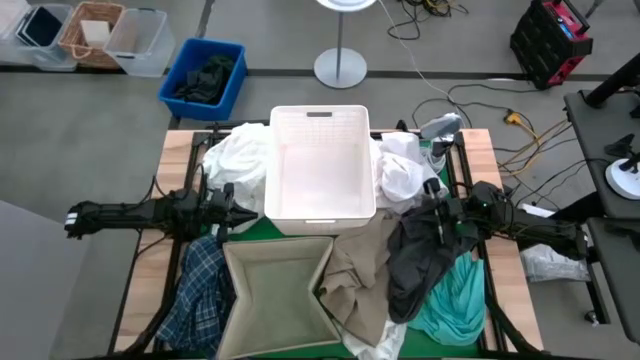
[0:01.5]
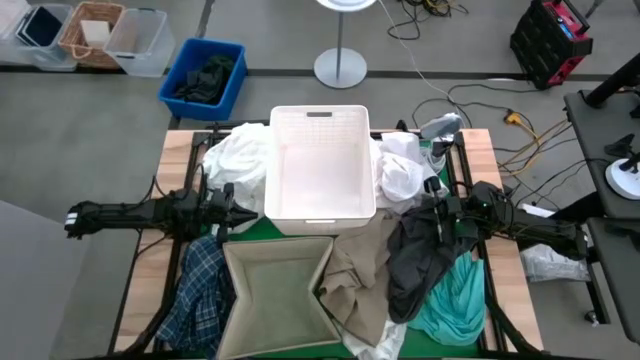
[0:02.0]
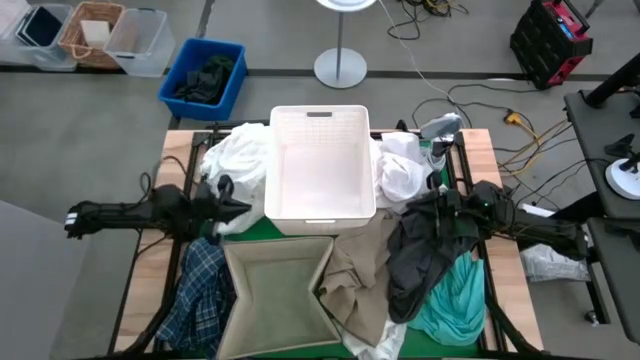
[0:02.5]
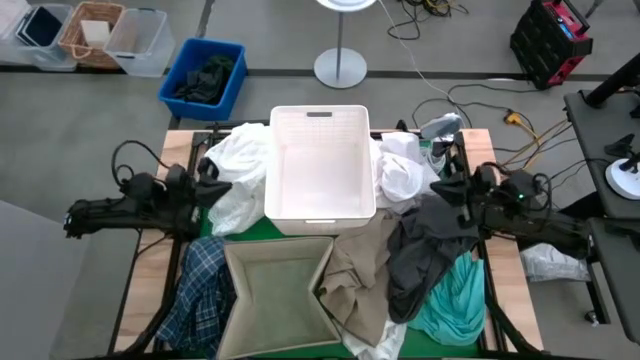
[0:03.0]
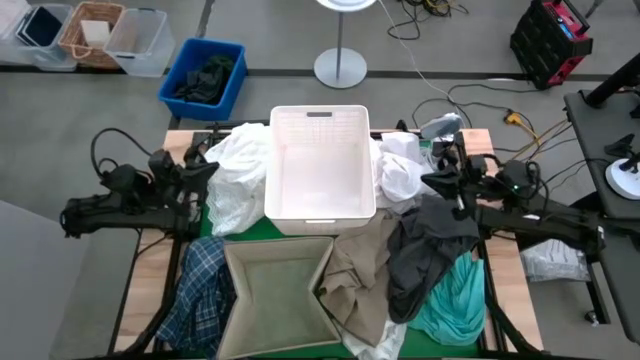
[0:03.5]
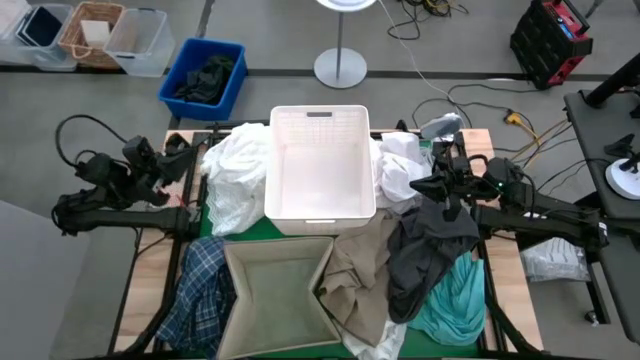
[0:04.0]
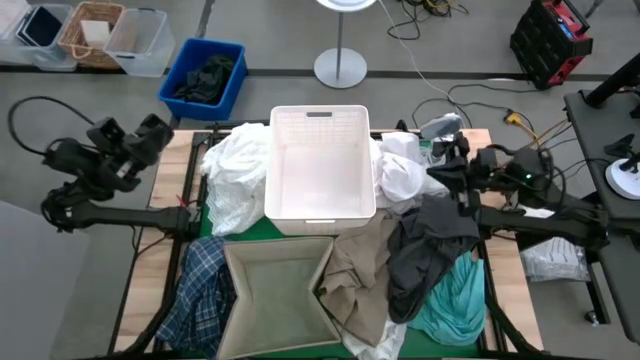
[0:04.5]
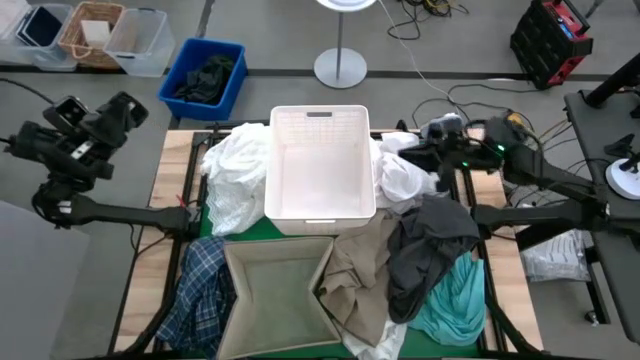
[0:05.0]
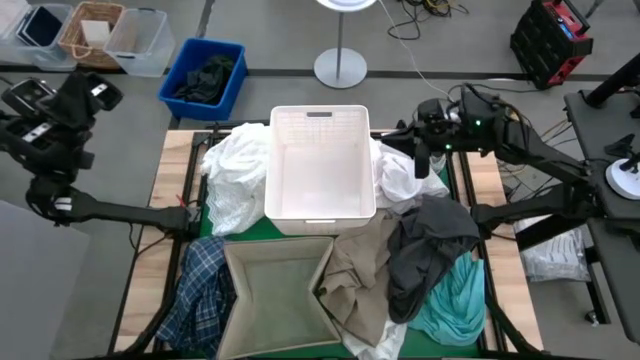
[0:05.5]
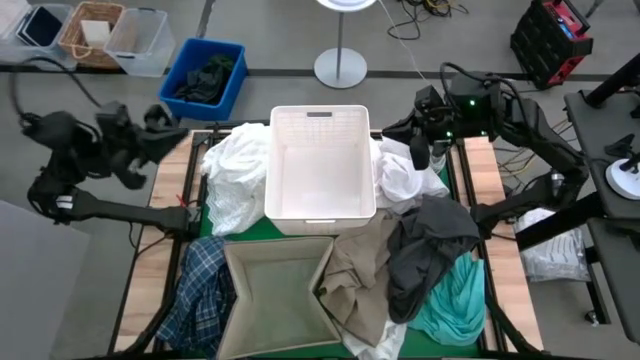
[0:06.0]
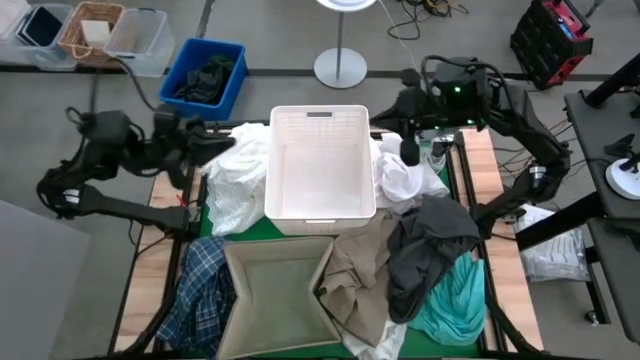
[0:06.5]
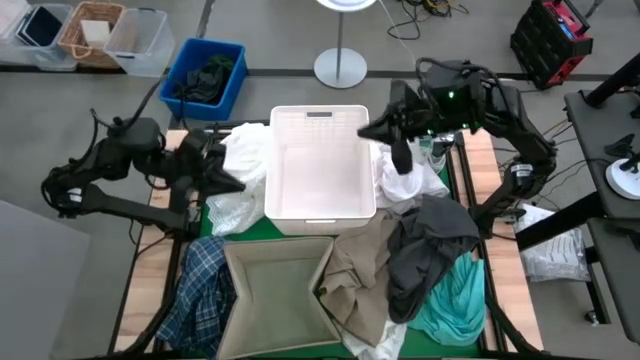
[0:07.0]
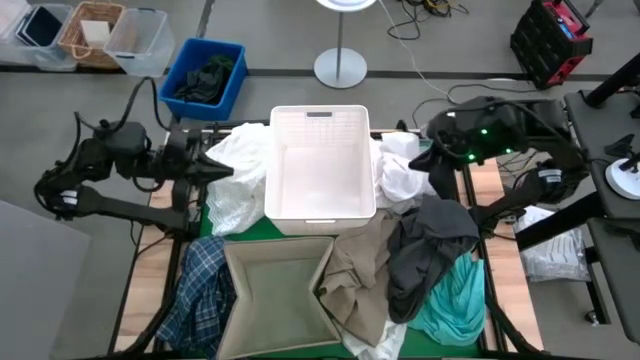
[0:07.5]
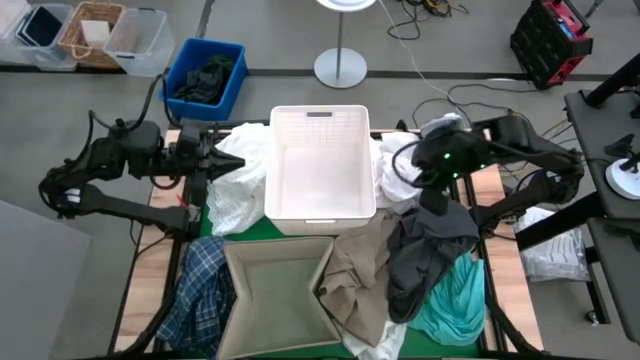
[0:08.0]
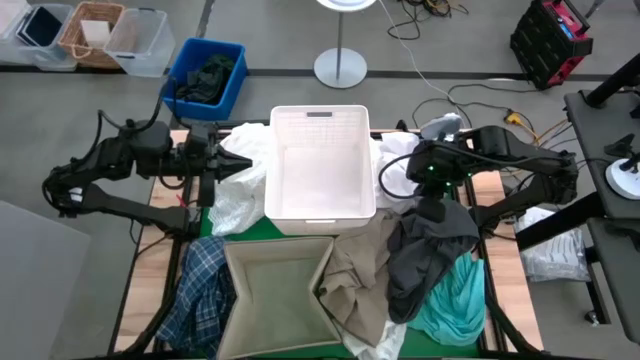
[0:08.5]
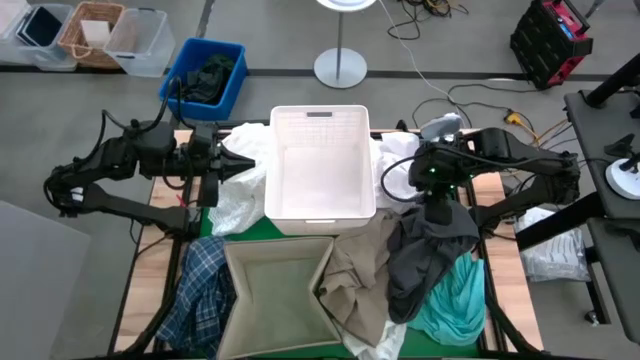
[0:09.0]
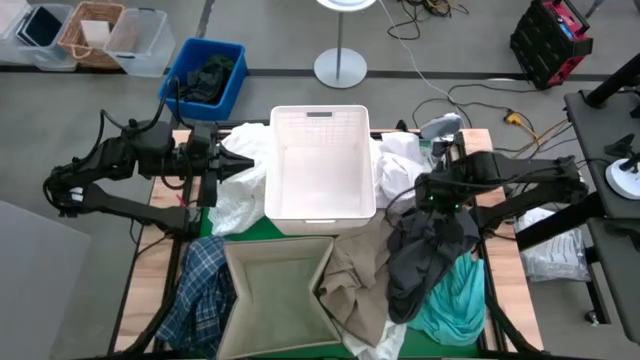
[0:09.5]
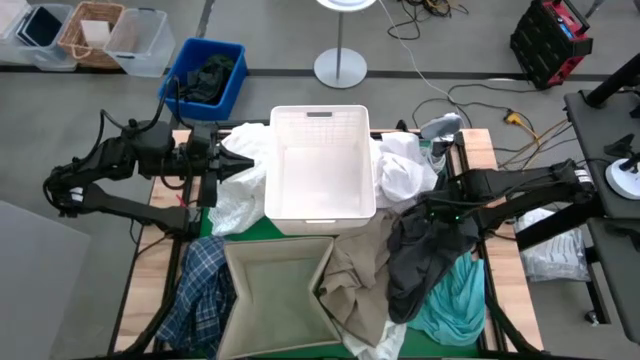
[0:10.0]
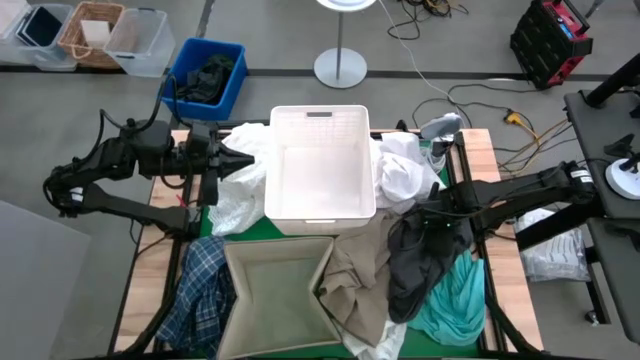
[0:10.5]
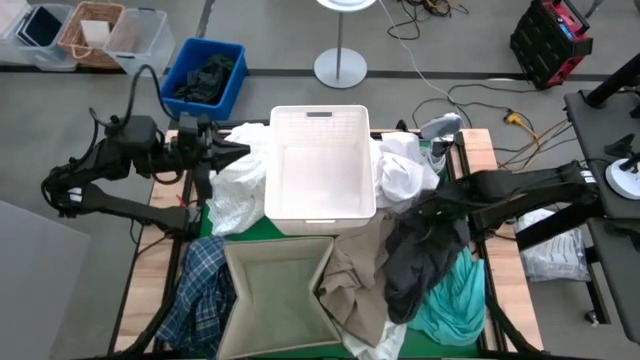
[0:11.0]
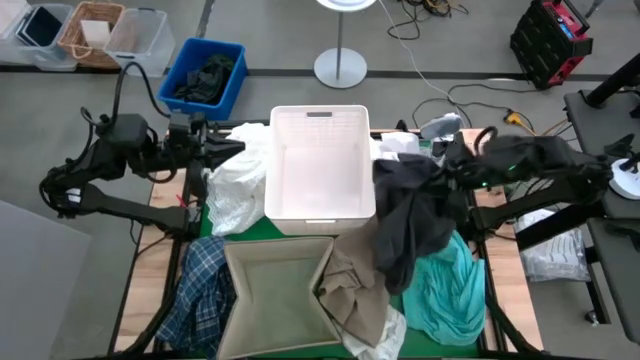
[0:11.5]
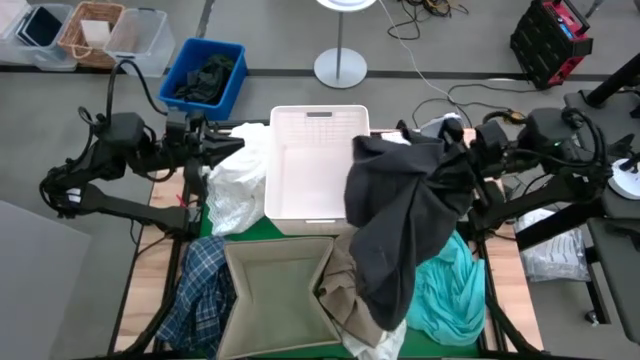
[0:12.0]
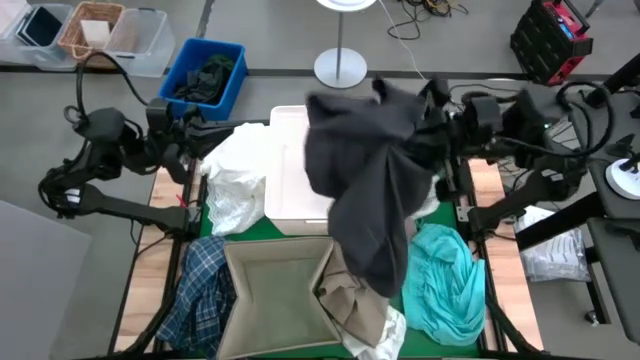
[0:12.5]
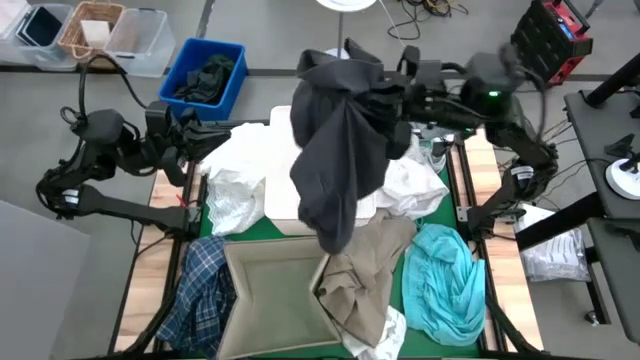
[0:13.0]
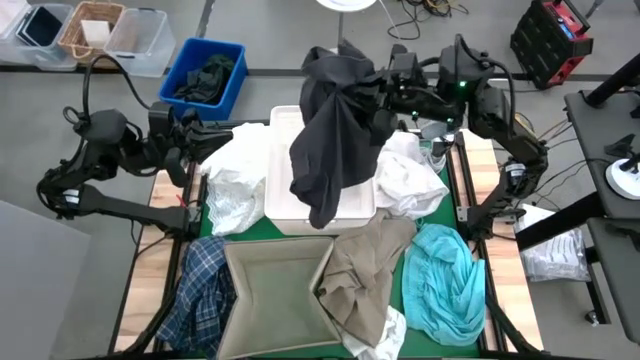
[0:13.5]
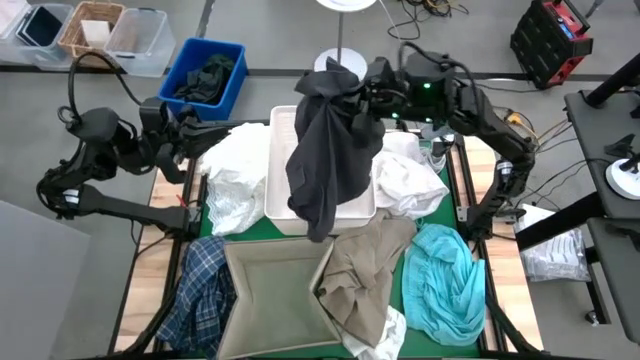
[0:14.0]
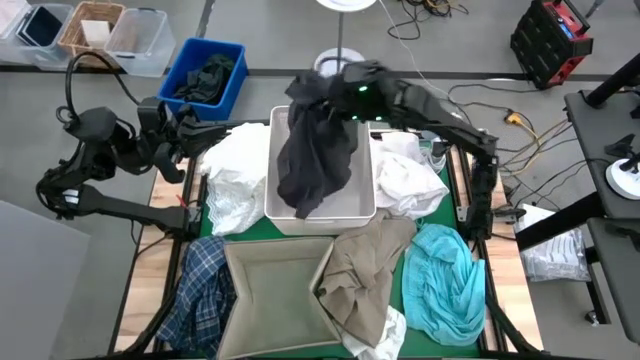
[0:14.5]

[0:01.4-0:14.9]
Task: Sort clothes
Put the black short pants into the white bin

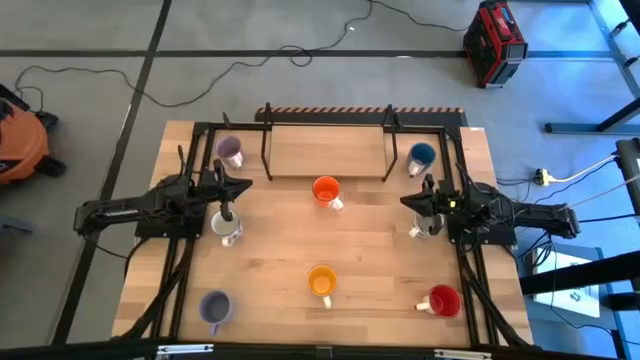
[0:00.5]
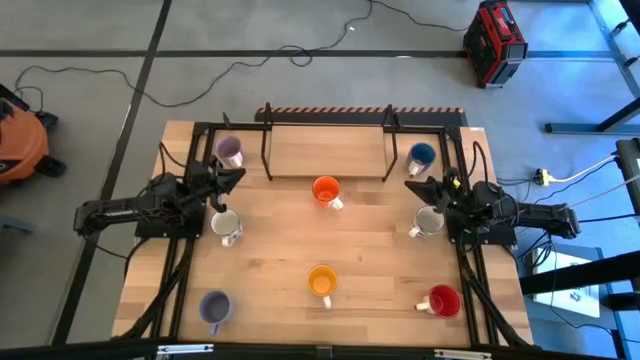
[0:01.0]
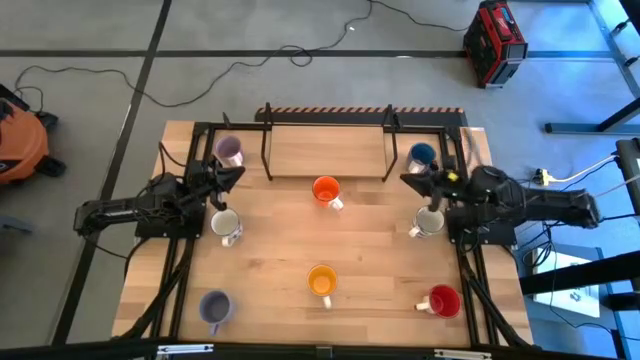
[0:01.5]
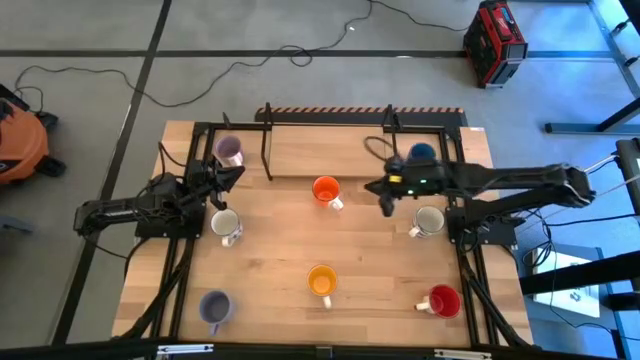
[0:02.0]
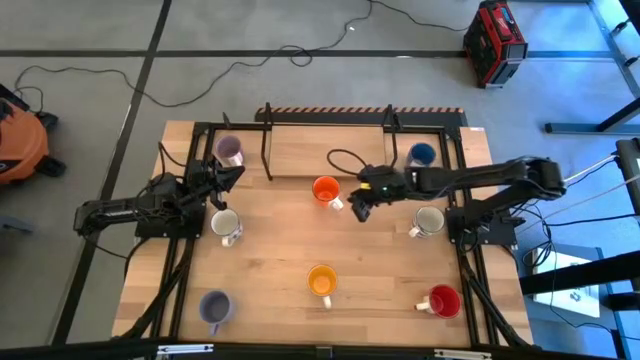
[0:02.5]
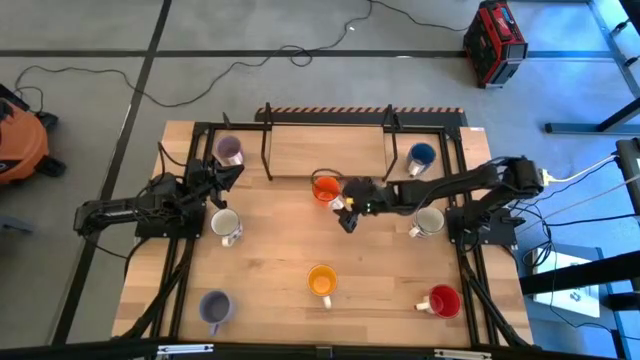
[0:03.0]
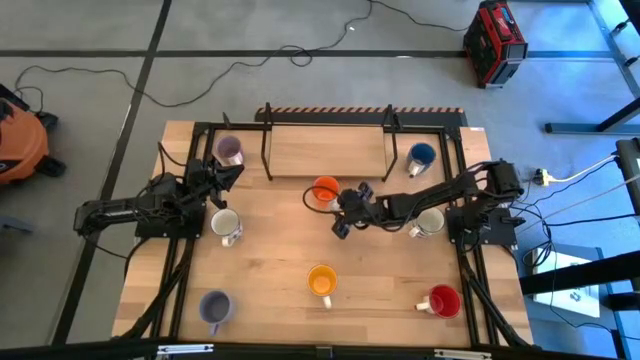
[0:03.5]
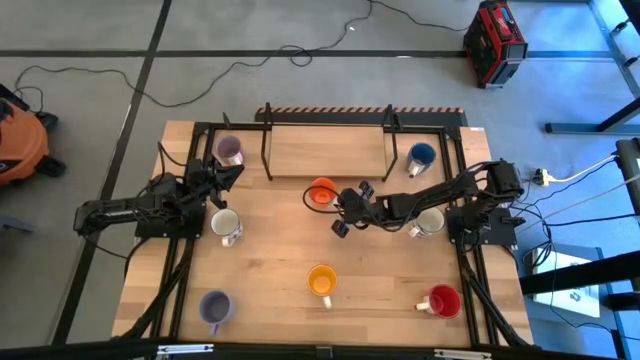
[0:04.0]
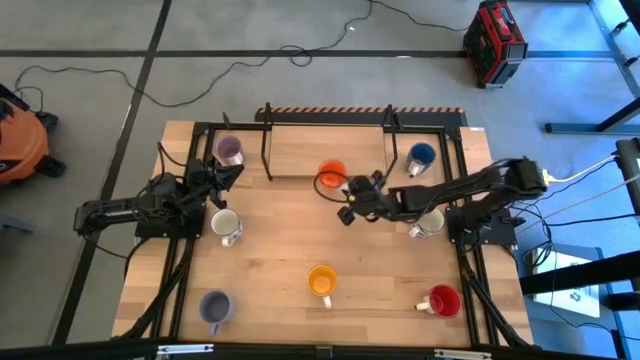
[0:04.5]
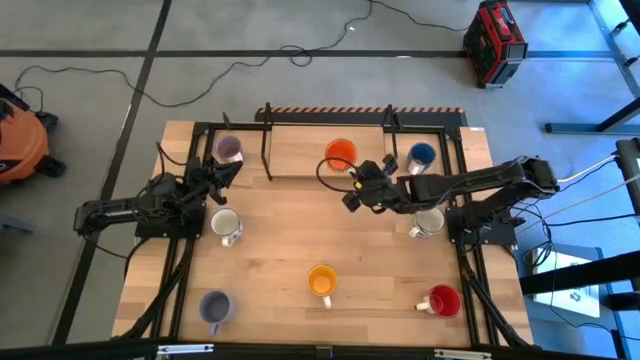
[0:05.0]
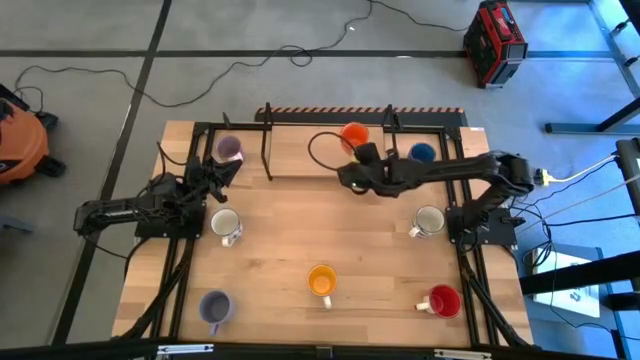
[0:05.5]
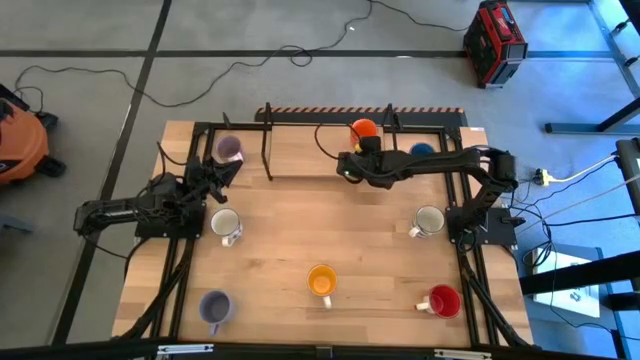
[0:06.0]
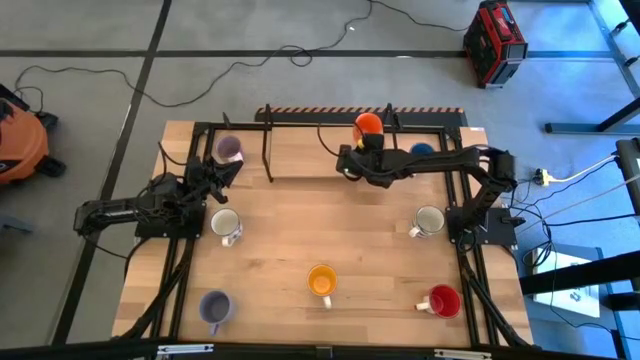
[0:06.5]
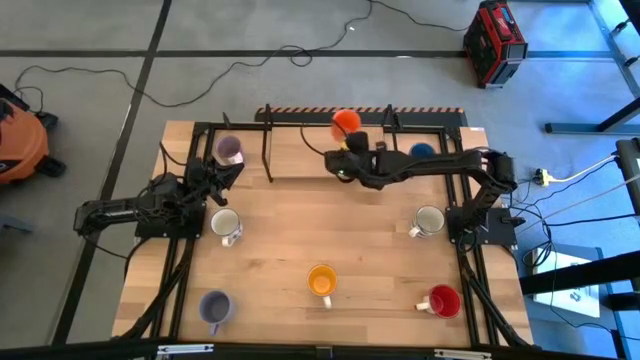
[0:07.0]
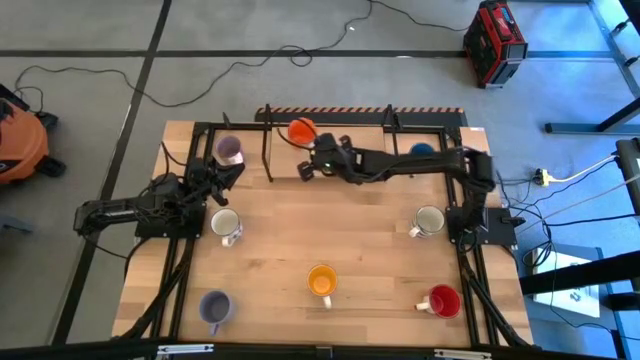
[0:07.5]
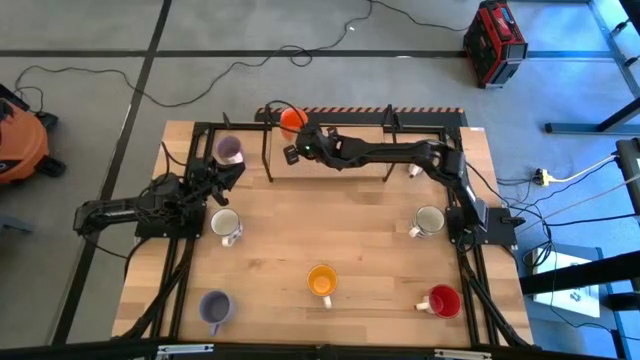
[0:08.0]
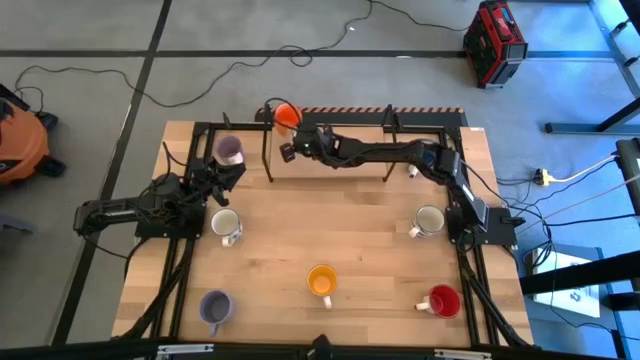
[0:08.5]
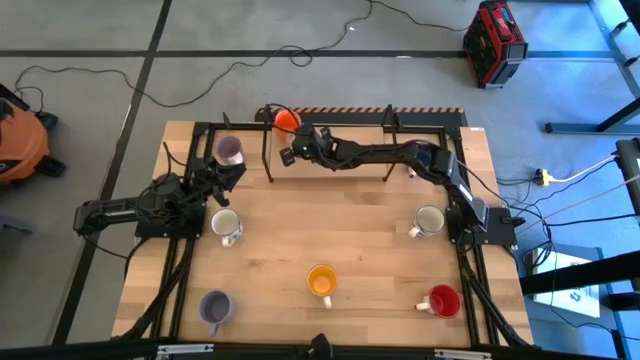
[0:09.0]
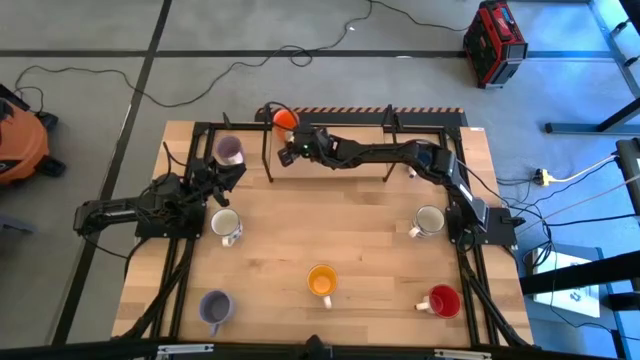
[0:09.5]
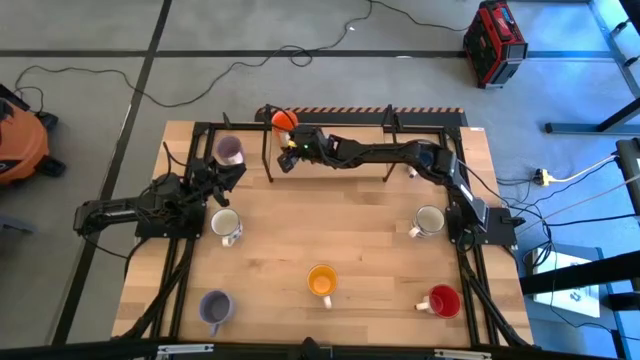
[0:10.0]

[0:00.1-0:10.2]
Task: Place coffee mugs
Put the orange mug on the shelf
